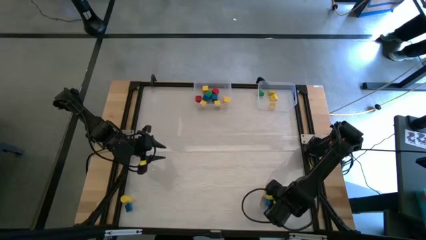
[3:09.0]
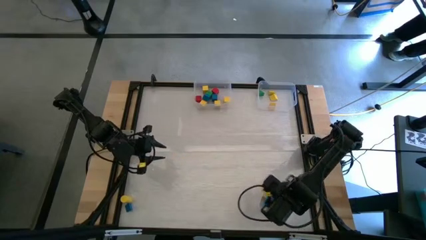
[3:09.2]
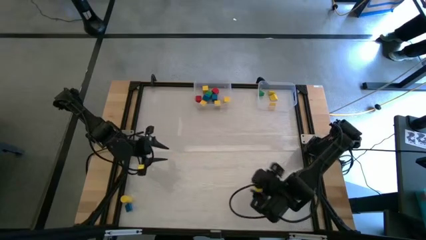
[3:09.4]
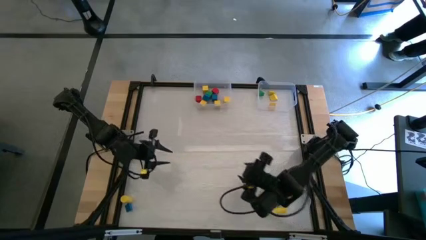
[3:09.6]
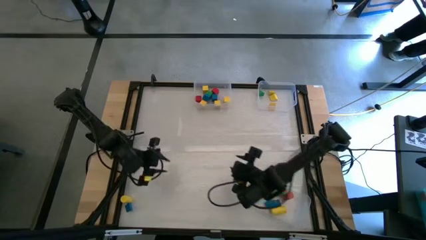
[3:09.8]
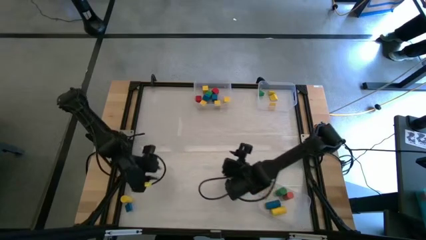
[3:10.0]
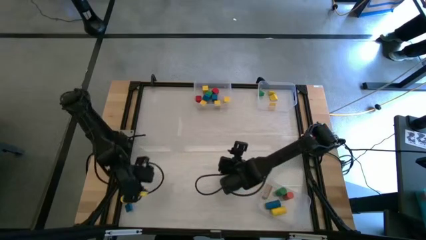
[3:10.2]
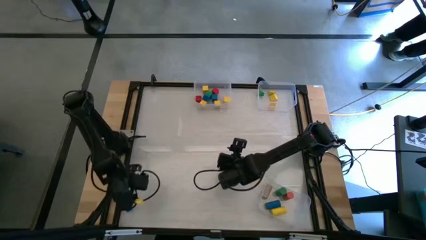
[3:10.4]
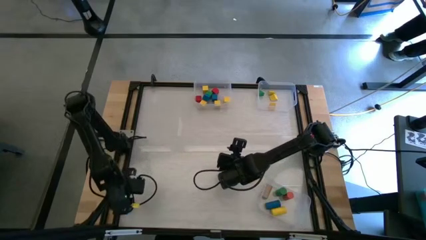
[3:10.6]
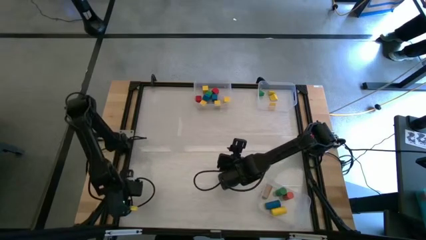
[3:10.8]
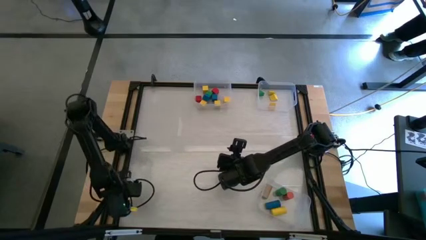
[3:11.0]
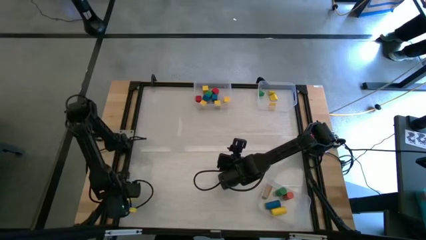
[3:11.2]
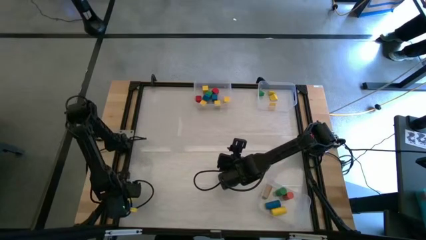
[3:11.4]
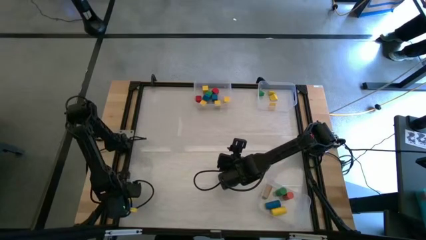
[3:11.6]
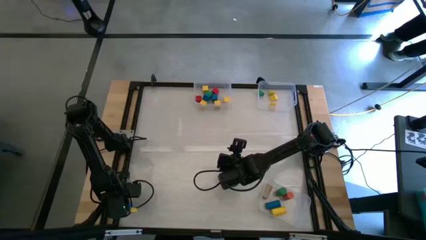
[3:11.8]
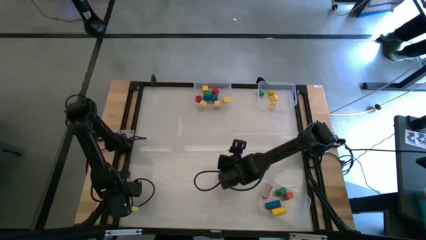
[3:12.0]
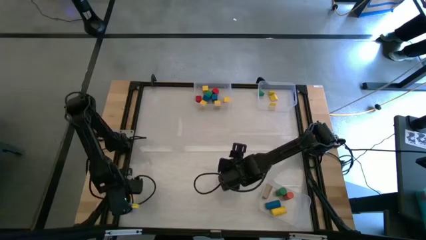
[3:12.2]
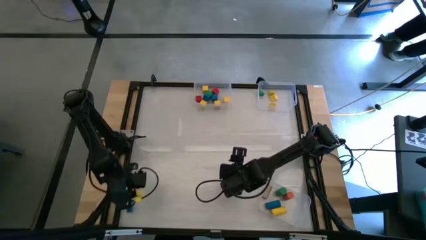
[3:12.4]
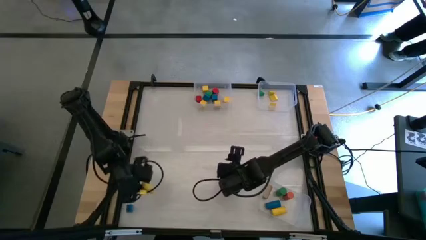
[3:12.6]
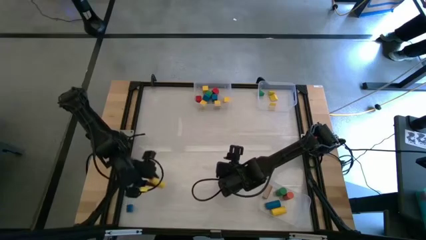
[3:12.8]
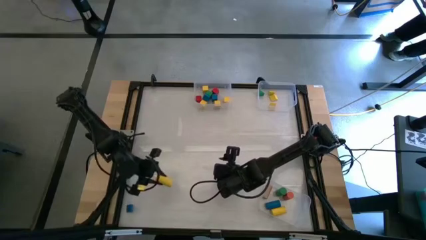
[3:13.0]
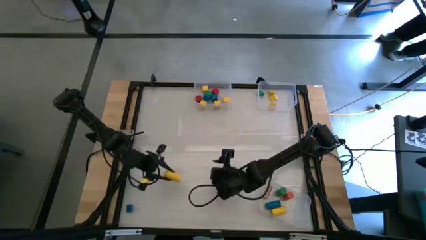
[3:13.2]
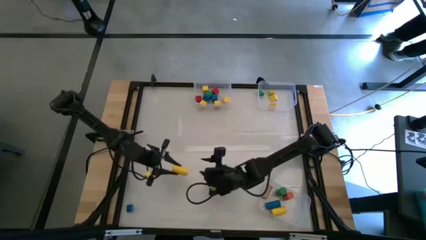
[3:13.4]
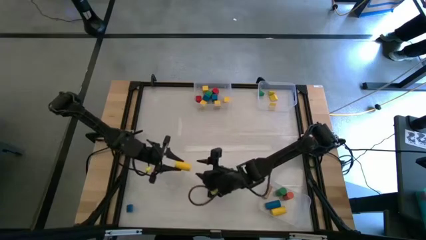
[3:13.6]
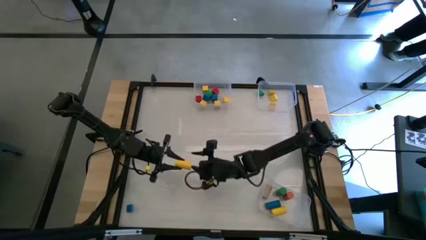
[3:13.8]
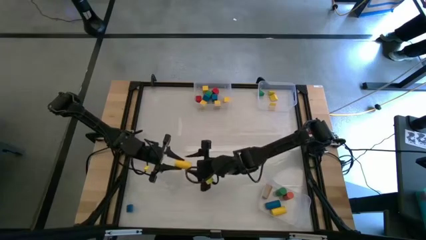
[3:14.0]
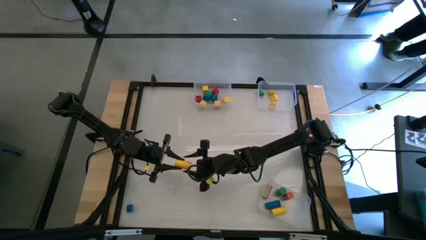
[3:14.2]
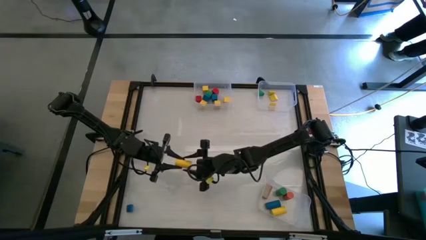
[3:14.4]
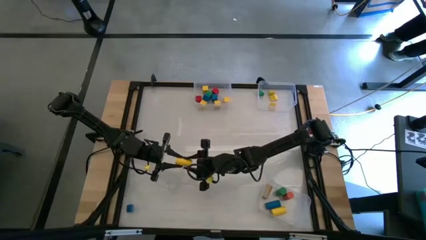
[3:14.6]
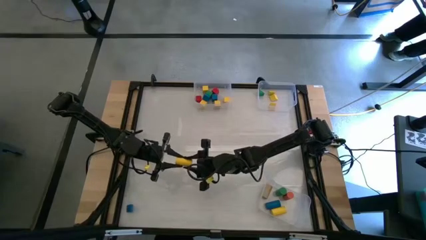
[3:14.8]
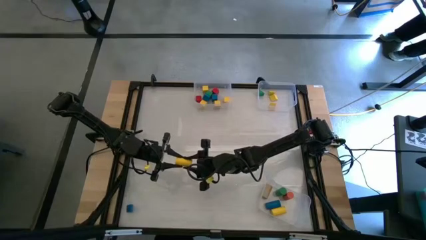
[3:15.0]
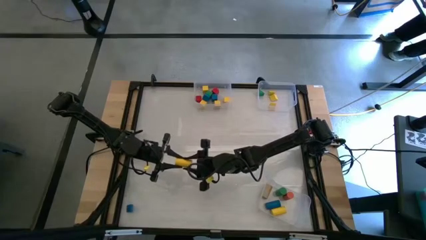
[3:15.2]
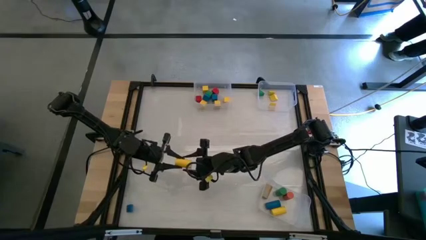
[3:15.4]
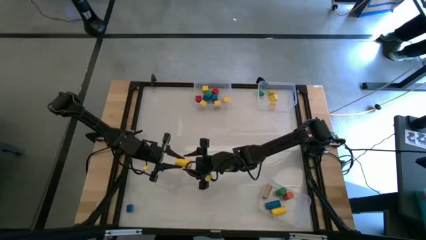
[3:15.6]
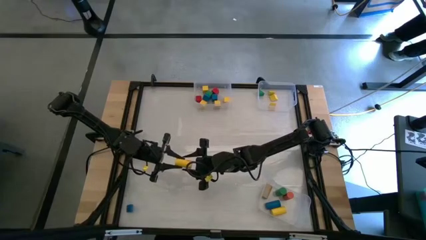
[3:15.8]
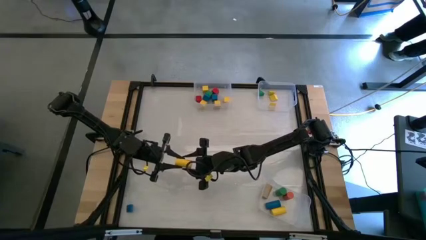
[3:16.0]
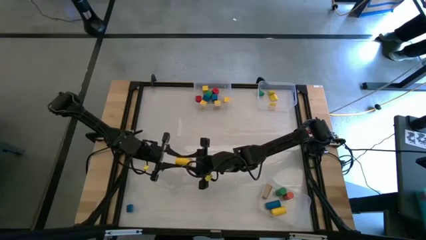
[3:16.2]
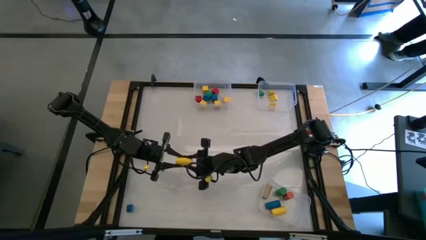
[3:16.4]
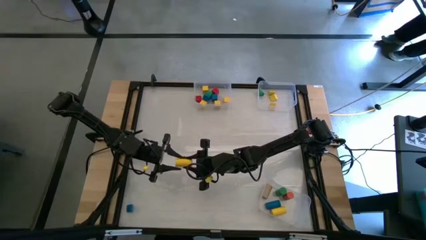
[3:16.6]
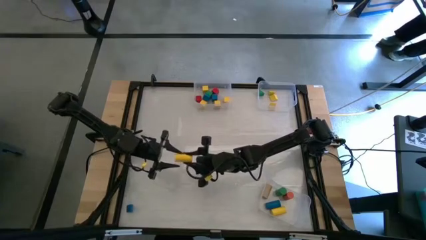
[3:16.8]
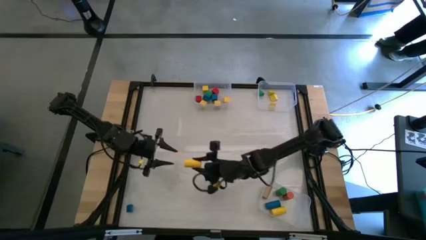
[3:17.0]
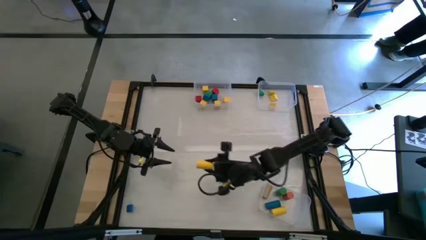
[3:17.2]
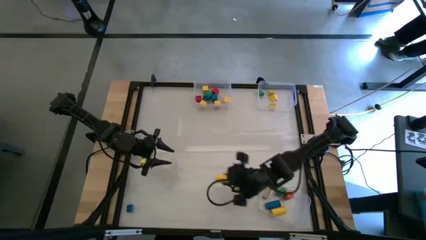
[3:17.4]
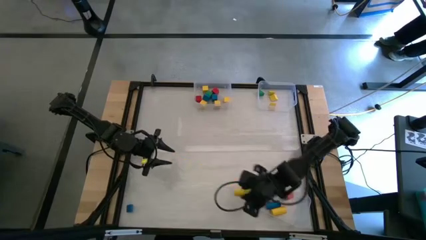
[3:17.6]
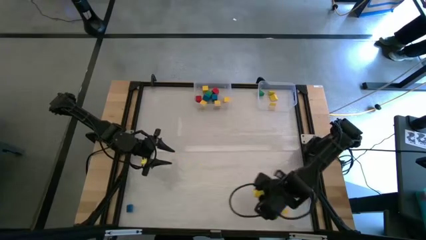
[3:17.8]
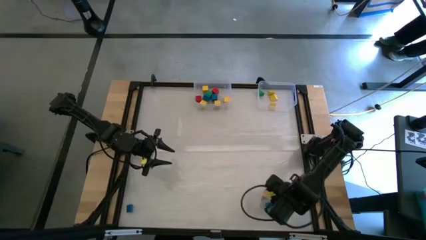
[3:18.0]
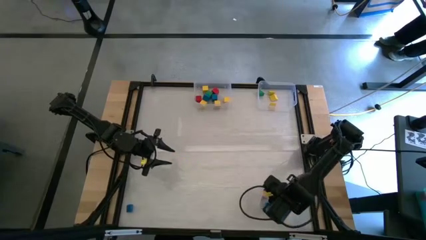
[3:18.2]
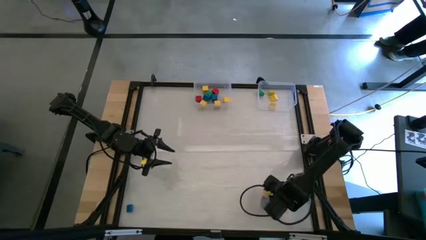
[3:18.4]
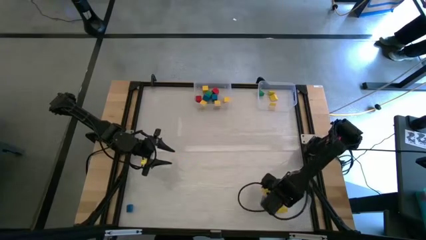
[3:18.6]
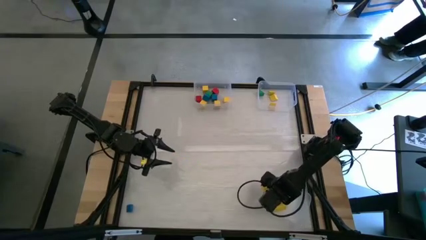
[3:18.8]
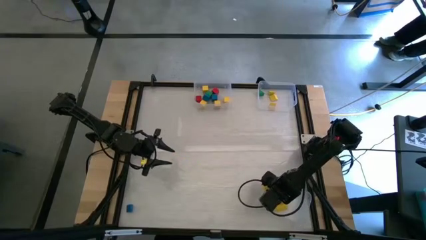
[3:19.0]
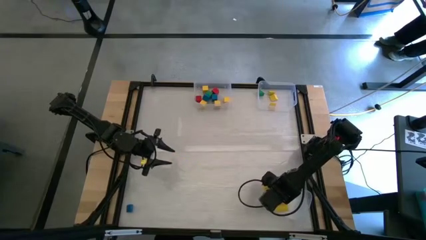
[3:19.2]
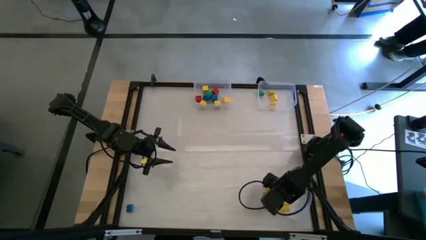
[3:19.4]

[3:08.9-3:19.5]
Task: Sort blocks by size
Put the cylinder yellow block into the bottom right transparent bin

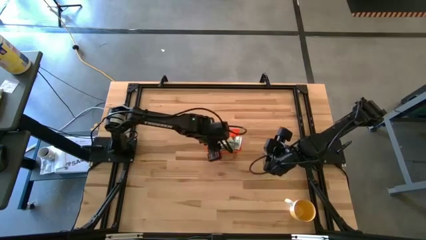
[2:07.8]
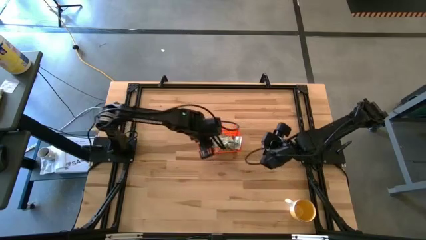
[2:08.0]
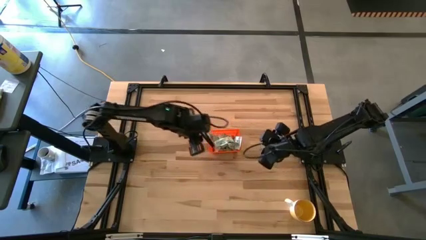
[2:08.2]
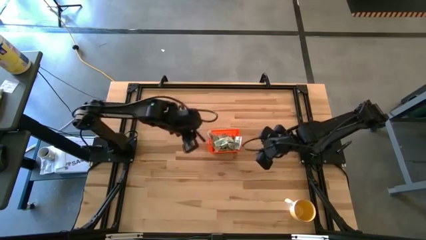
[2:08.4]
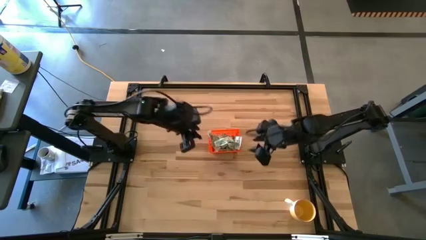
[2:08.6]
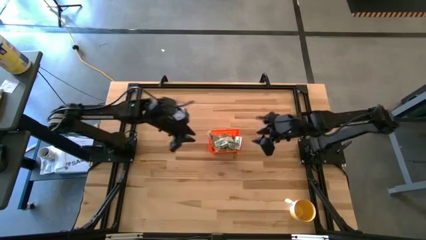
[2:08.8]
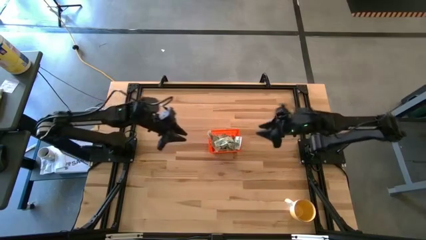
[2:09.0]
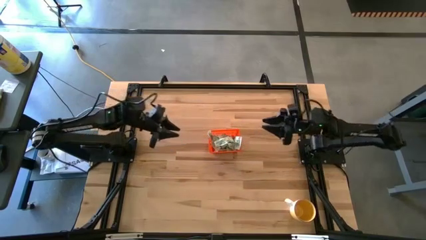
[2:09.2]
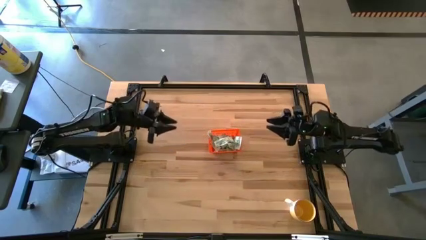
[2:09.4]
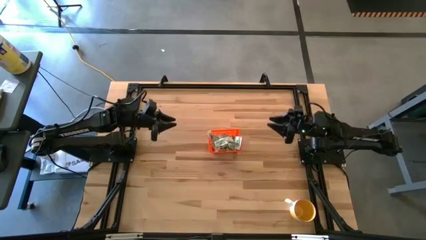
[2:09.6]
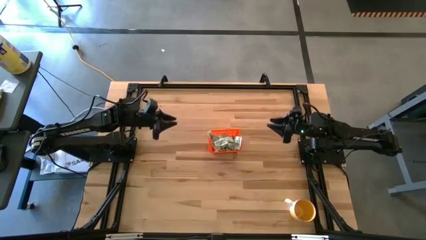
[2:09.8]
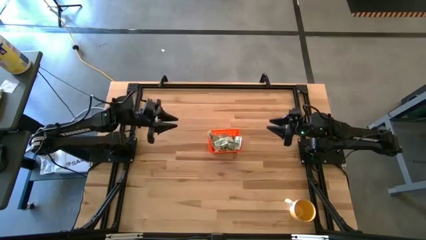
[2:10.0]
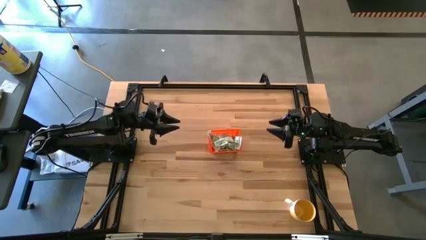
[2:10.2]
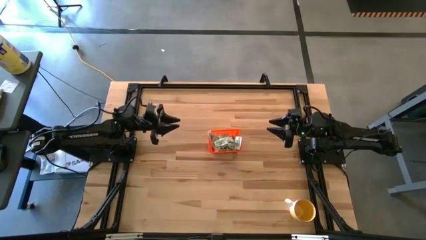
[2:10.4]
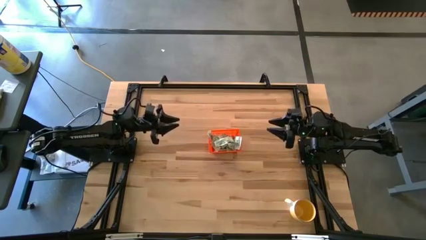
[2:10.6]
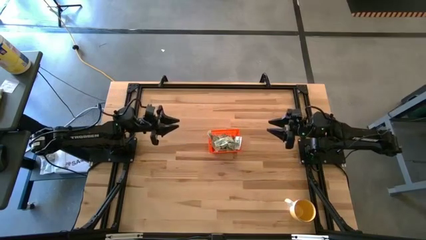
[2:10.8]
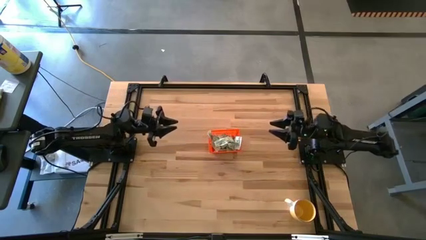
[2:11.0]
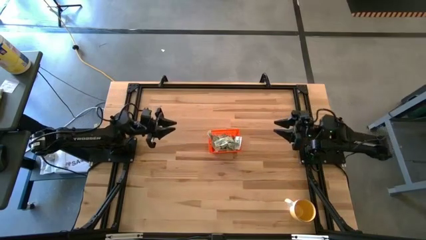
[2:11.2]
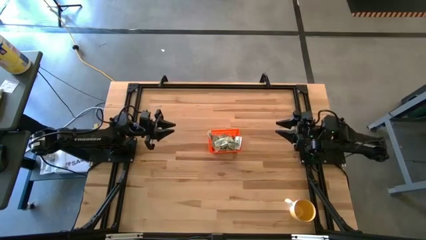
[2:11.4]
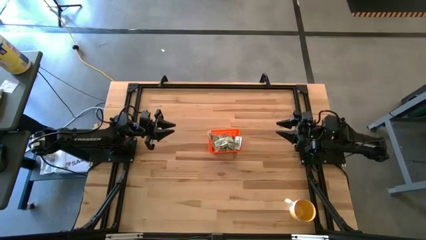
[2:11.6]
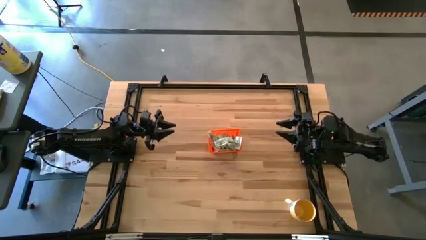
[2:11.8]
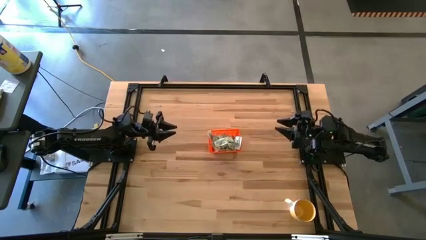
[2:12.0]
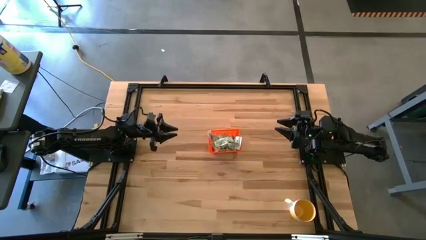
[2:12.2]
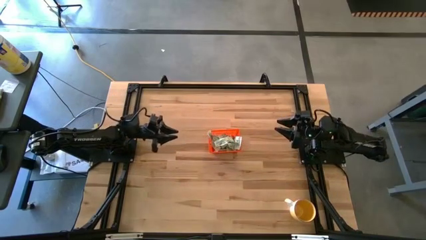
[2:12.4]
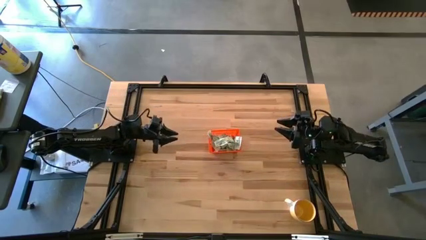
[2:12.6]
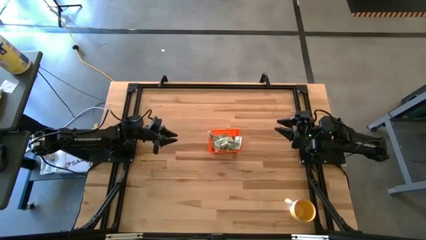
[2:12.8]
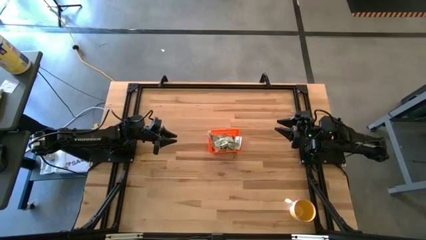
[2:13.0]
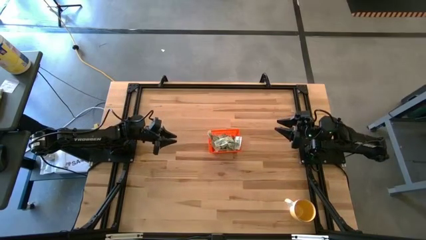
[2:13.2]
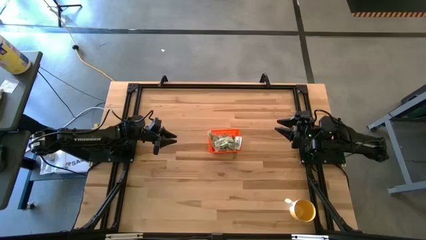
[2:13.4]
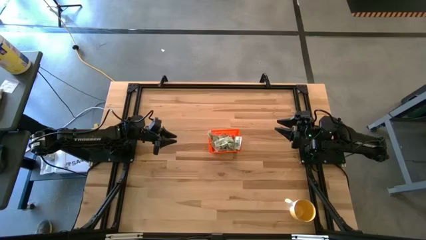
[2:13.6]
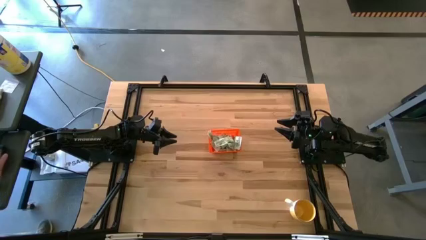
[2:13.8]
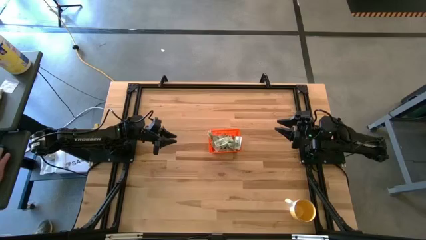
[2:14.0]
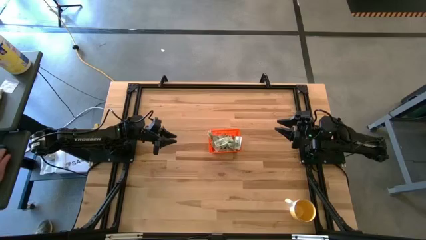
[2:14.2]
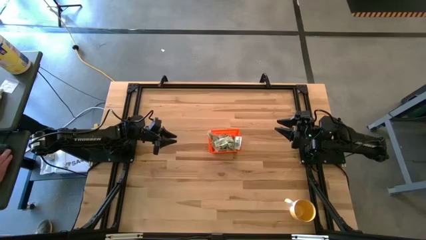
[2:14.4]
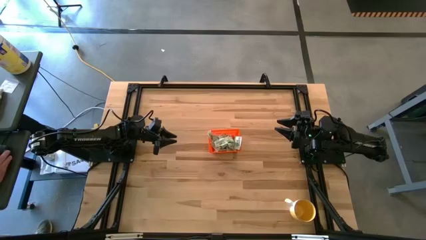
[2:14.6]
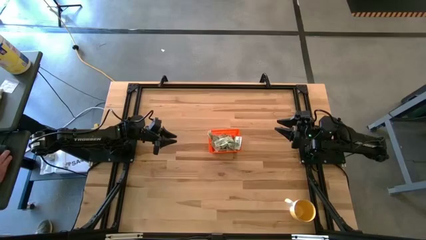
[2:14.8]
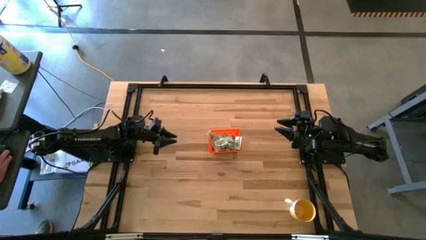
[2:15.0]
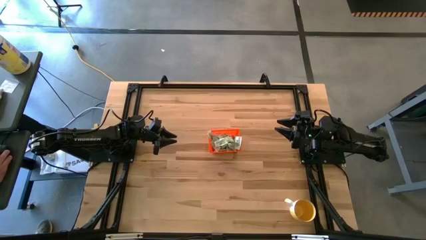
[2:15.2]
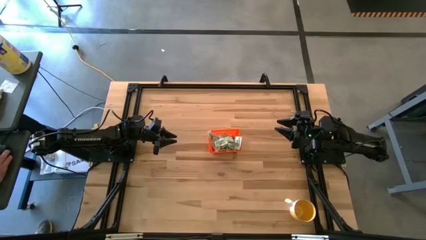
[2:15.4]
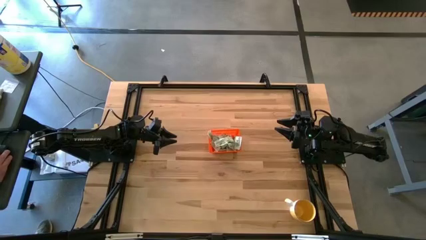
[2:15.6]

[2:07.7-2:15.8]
Task: Pick and place Stevia / Truvia into bins
Return to Home Position
